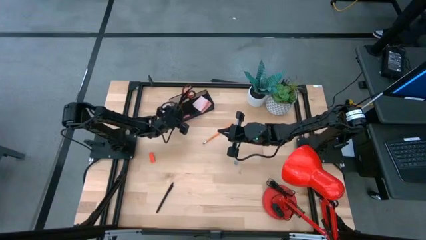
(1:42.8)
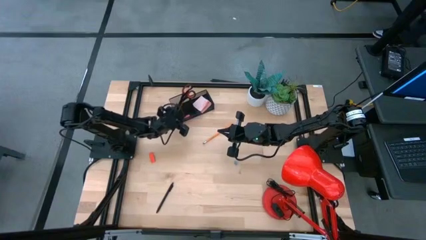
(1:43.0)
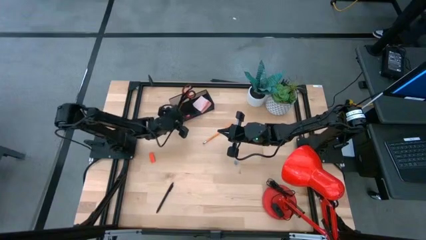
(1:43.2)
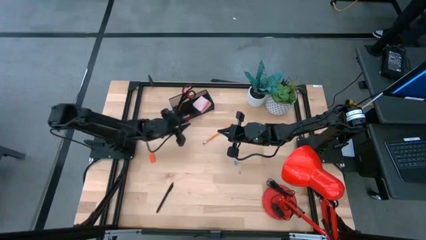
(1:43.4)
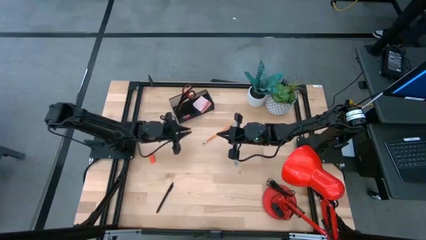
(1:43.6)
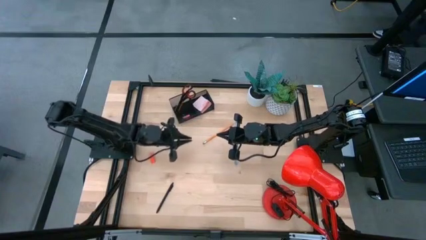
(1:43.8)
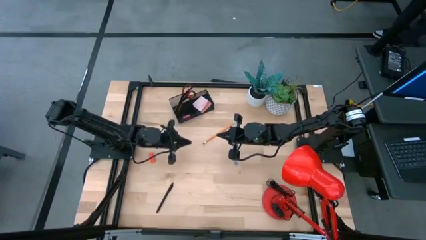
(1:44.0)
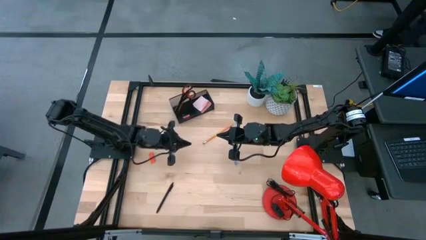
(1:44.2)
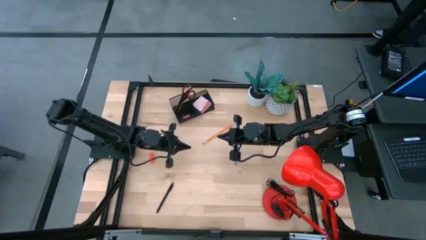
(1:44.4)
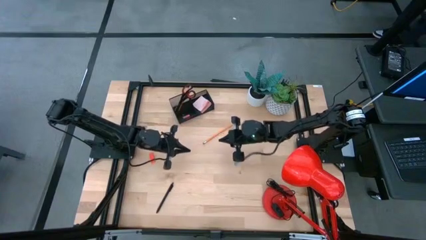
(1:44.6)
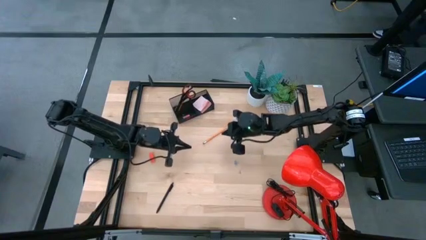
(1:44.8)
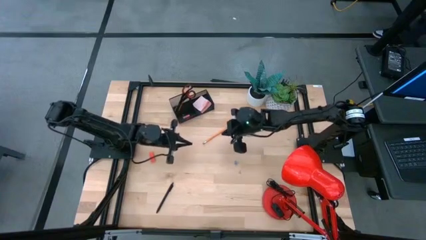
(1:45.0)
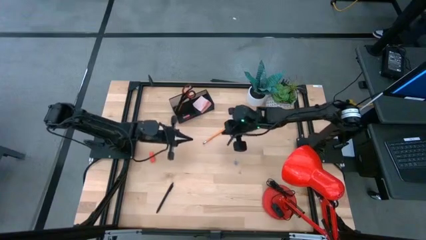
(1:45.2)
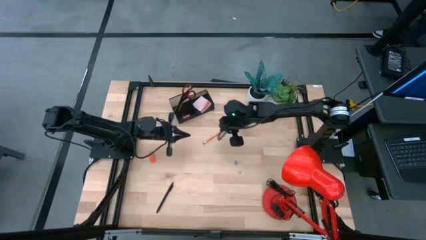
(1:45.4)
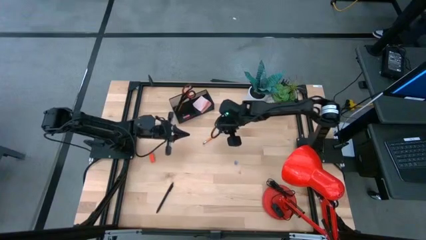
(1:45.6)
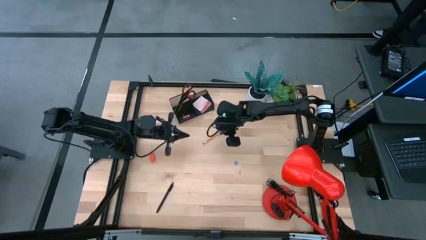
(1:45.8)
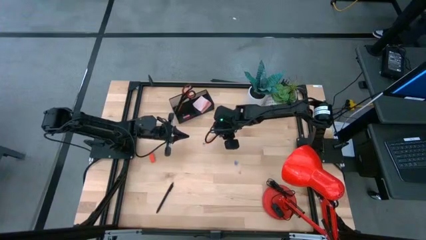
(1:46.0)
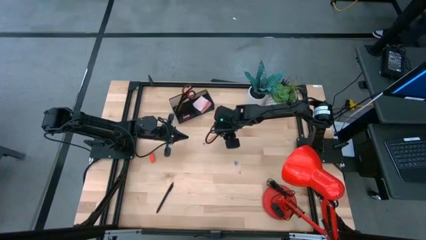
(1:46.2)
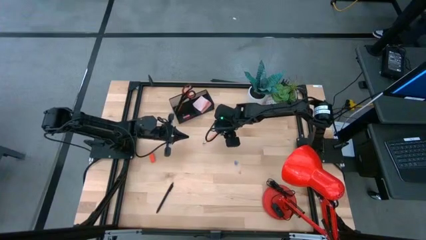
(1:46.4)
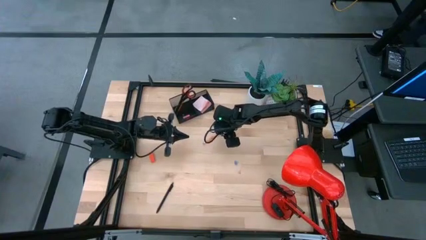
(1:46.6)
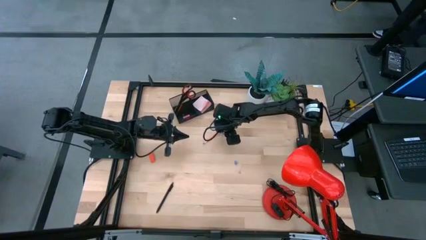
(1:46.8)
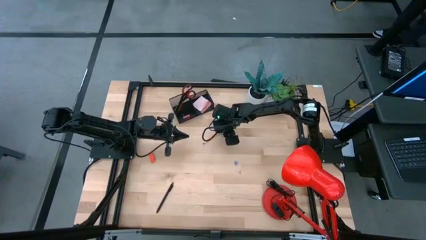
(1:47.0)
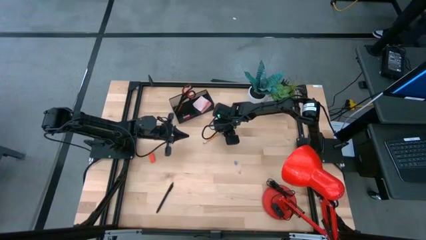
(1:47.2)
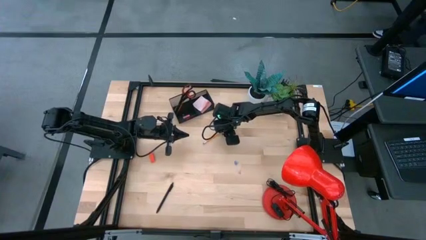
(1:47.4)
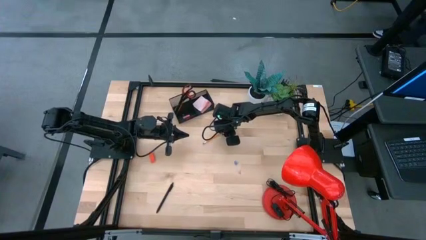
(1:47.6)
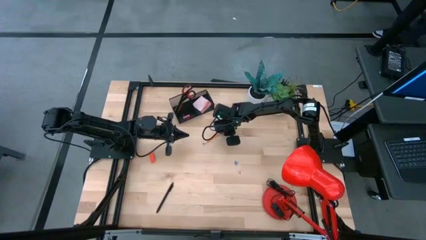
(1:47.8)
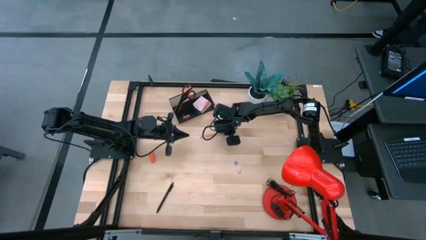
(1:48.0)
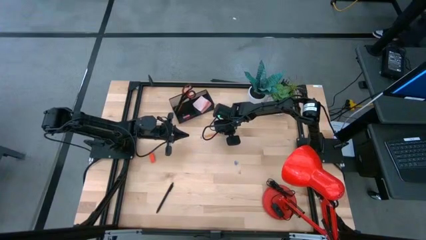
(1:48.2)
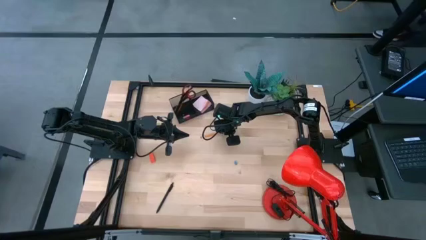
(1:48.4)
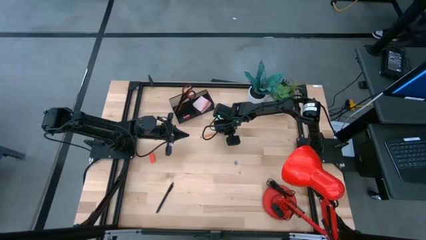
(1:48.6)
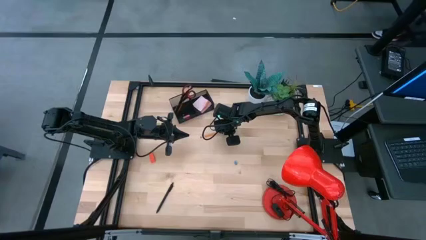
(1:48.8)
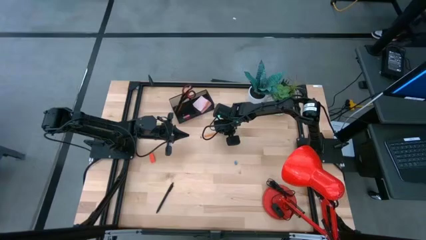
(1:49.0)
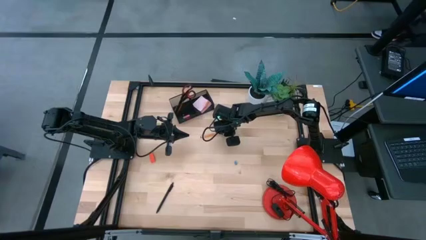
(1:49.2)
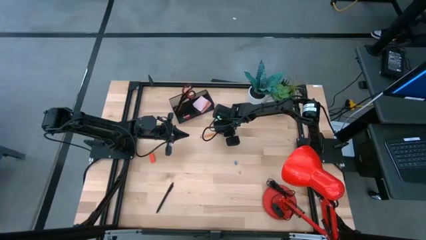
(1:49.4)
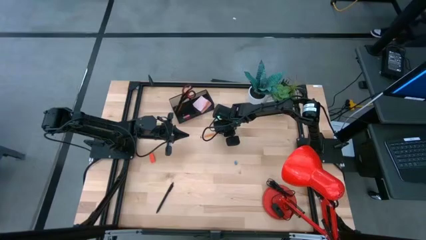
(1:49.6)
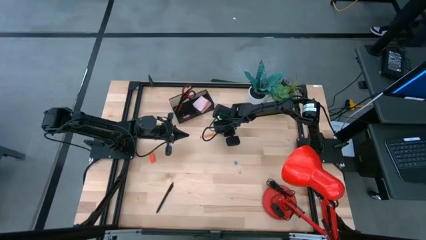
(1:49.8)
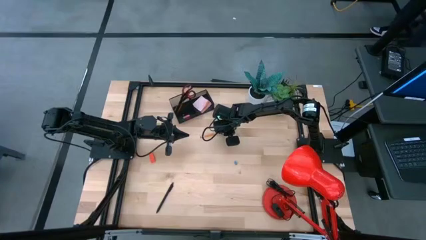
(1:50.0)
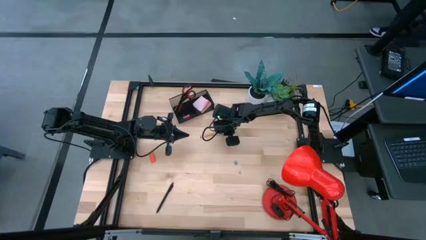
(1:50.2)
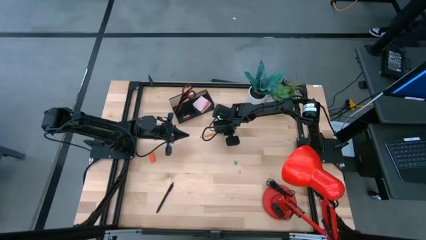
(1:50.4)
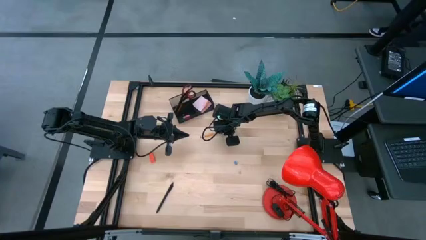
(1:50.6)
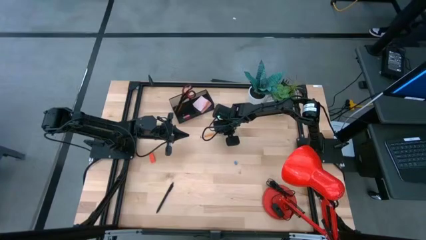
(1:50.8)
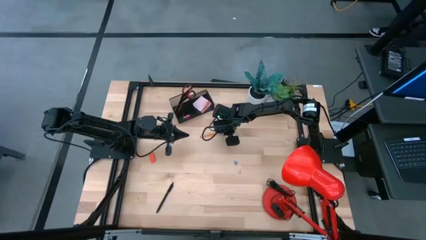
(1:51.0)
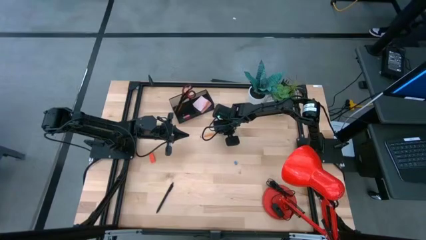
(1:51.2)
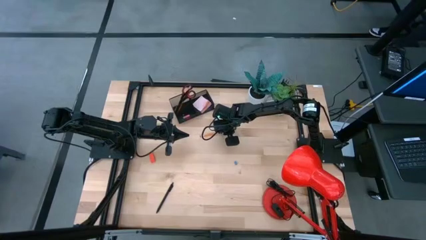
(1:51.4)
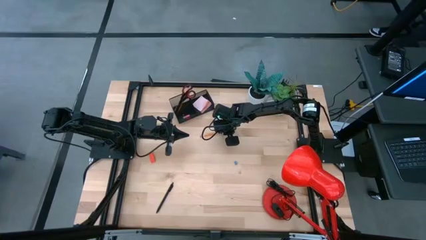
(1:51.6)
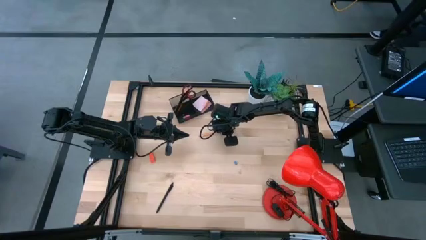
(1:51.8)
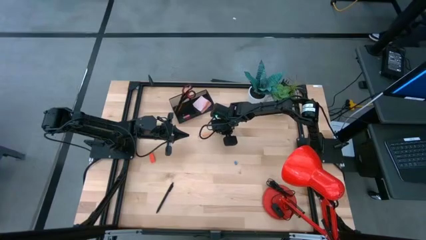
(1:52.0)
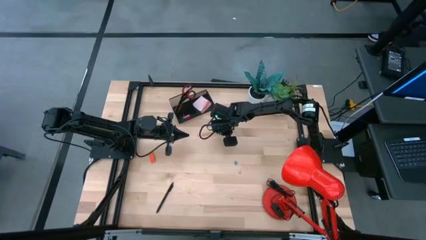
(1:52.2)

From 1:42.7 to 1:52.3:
Task: Pick and place office supplies into organizer
Put the pencil into the desk organizer
